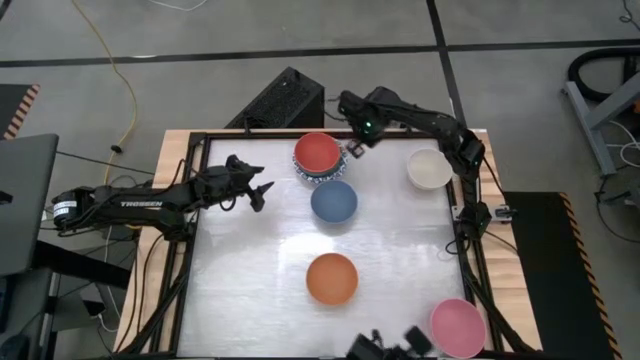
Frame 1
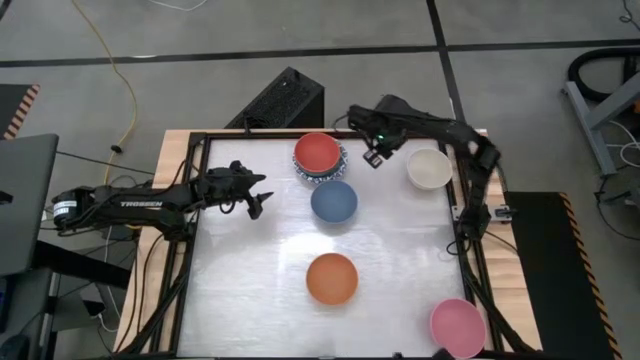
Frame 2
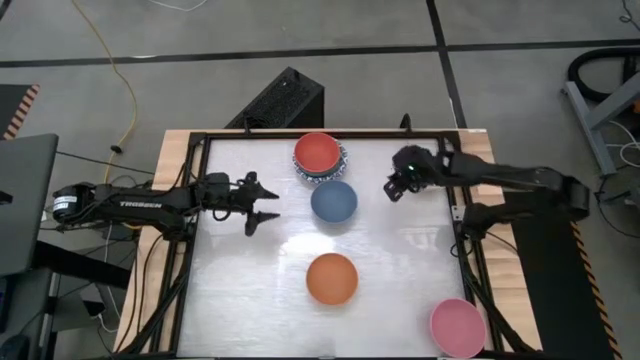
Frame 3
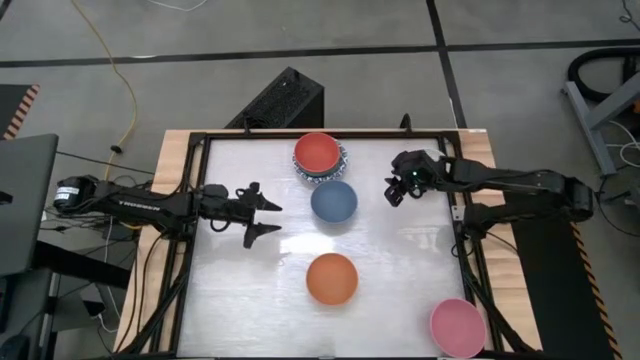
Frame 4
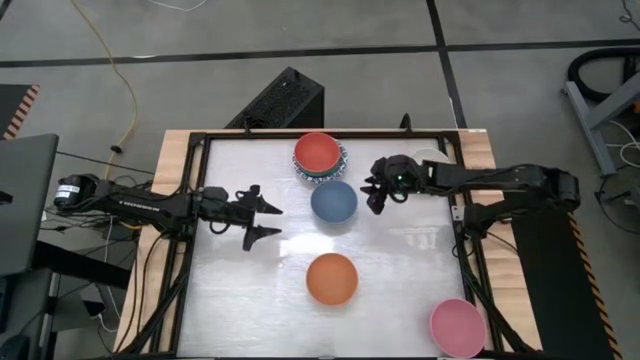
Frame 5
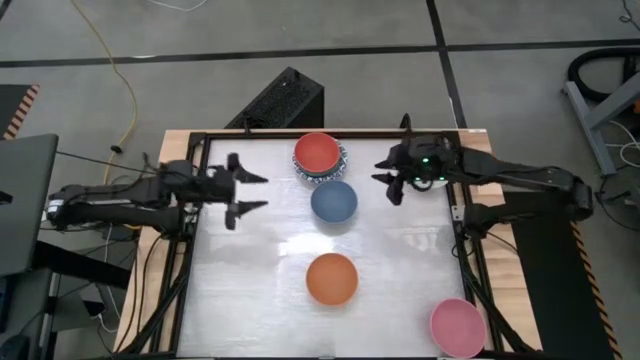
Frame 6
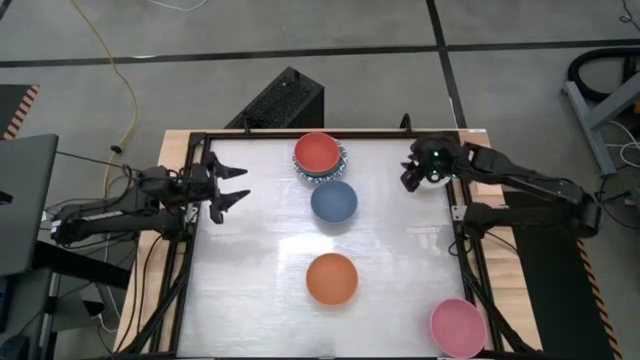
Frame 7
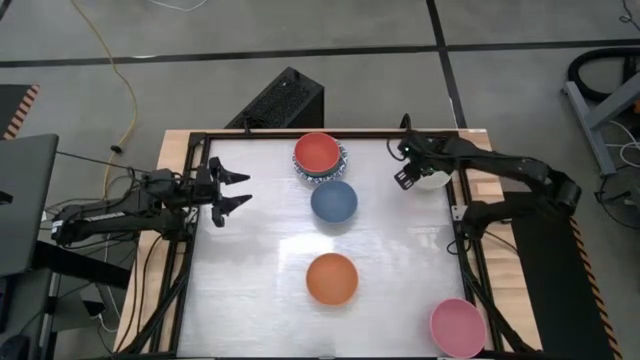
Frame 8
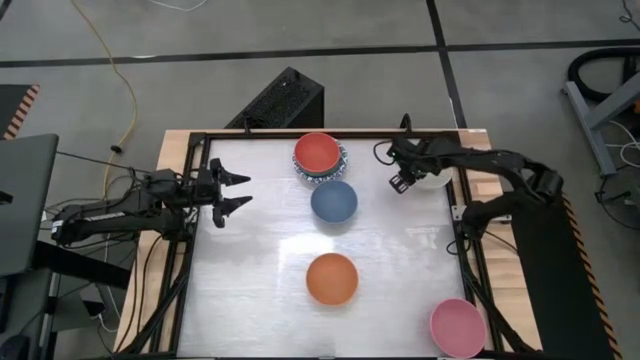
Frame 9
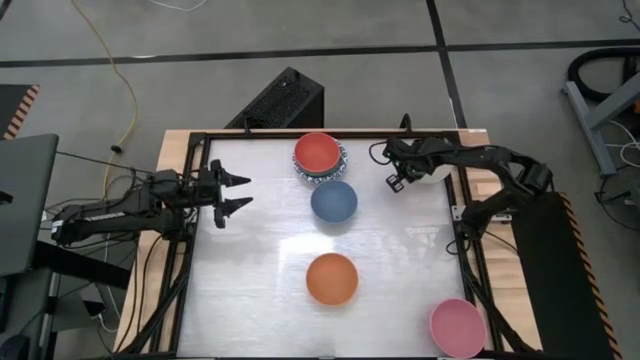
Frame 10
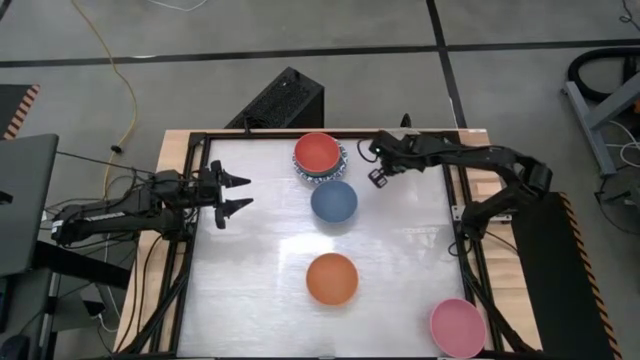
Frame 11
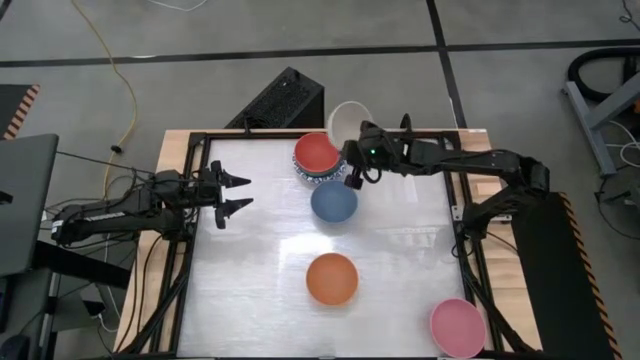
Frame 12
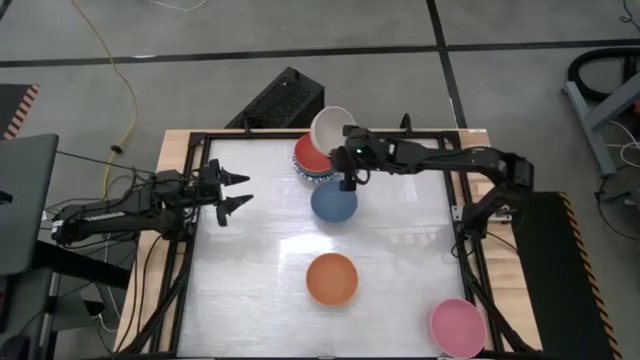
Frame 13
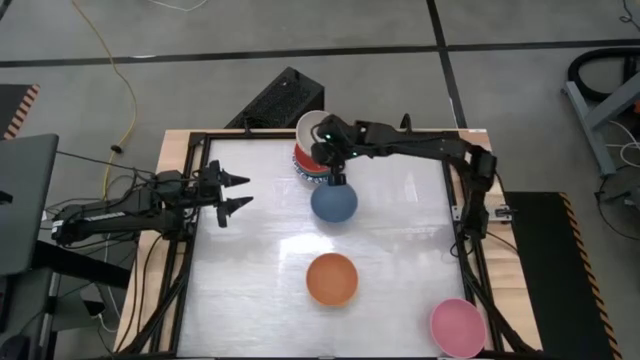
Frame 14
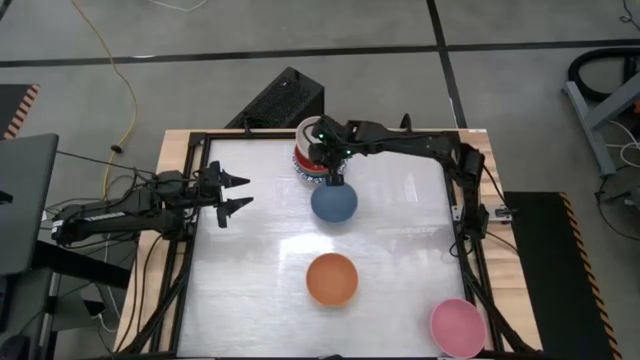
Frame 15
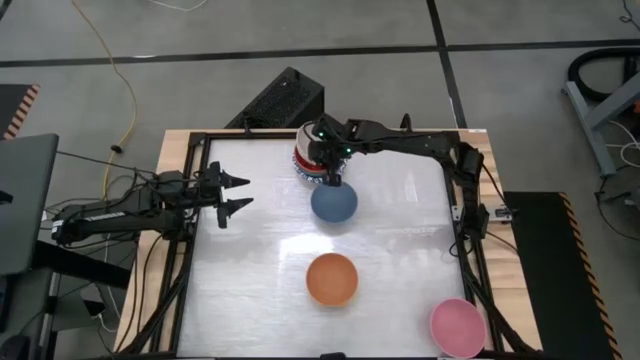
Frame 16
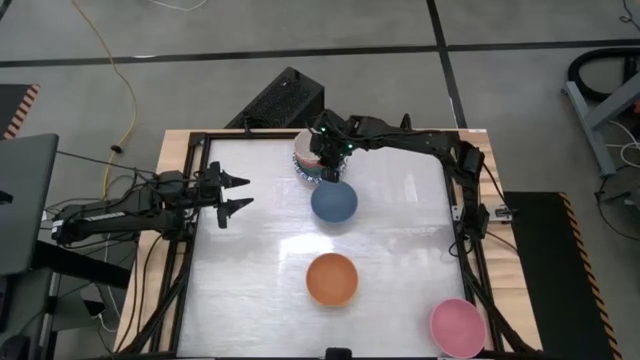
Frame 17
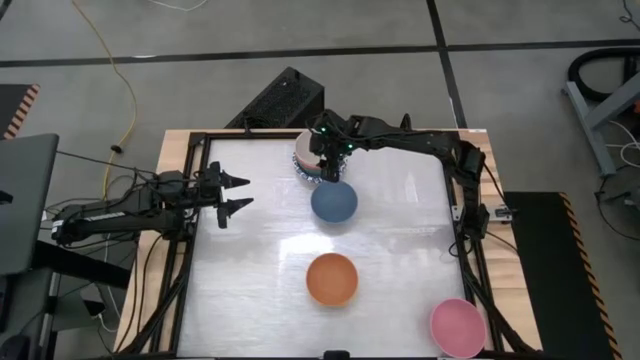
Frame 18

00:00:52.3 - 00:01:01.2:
Stack the white bowl on top of the orange bowl

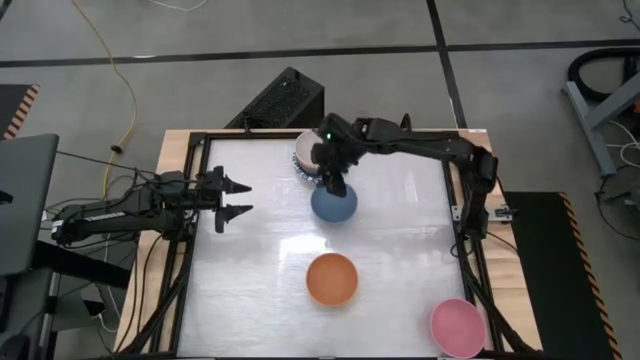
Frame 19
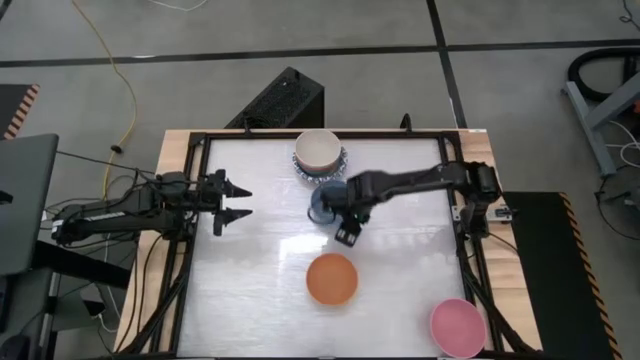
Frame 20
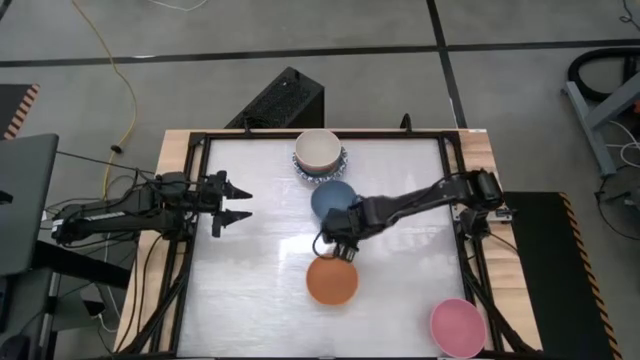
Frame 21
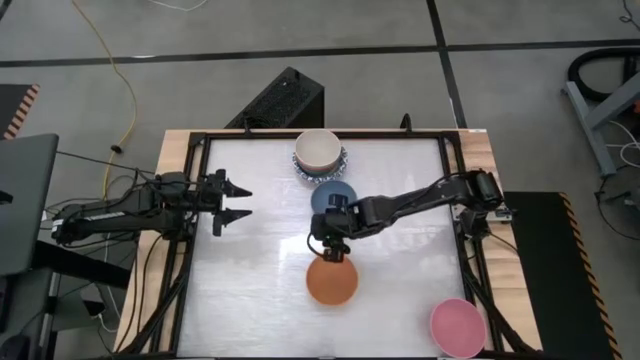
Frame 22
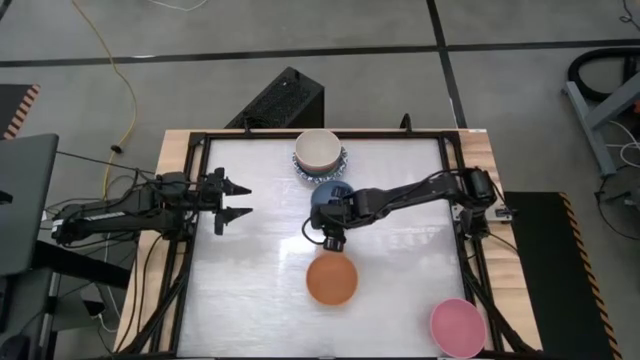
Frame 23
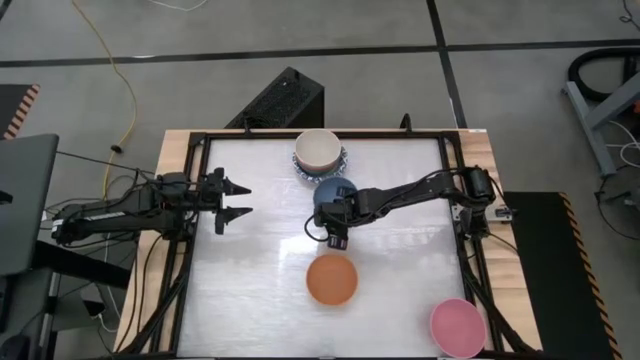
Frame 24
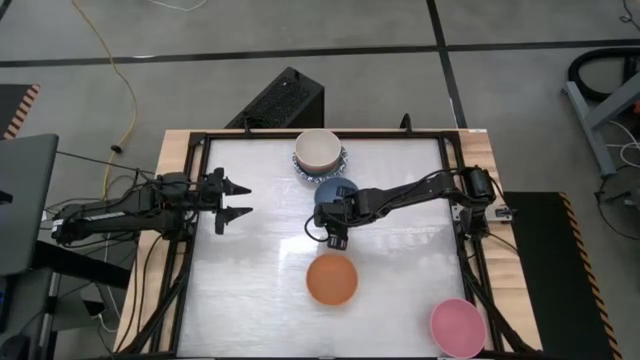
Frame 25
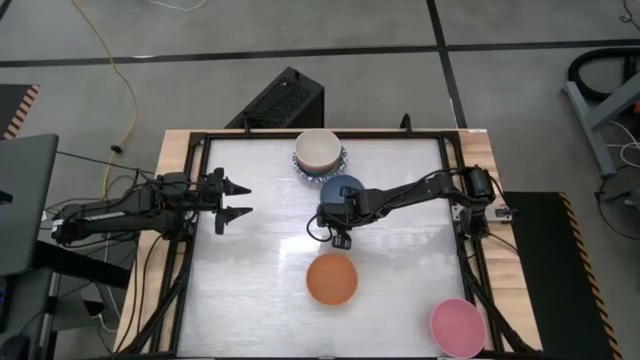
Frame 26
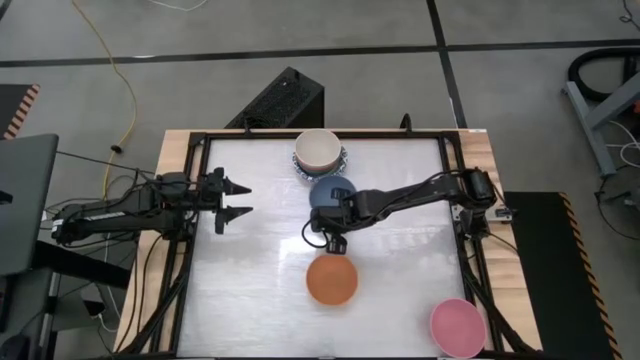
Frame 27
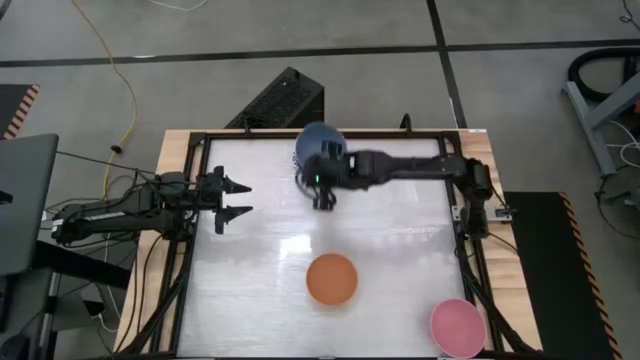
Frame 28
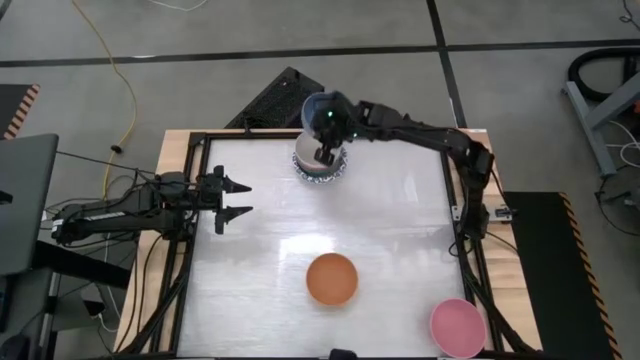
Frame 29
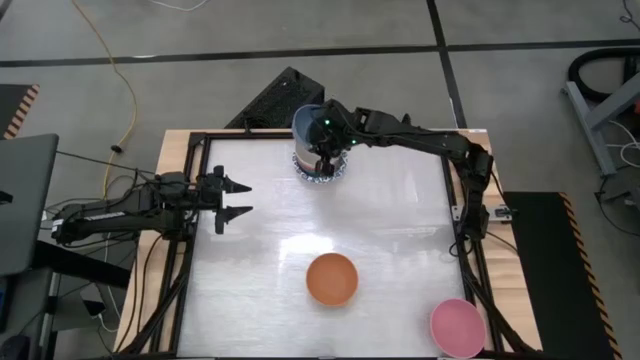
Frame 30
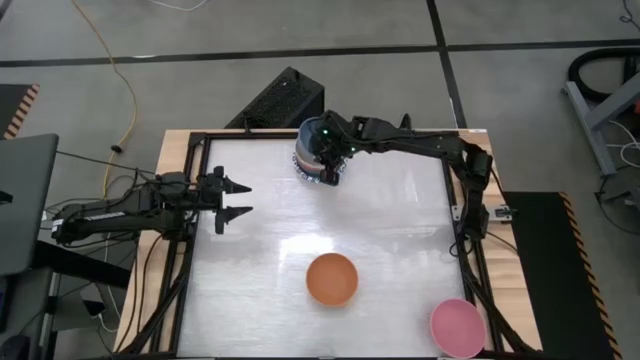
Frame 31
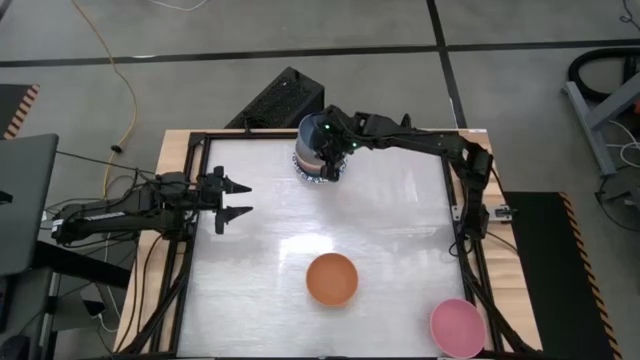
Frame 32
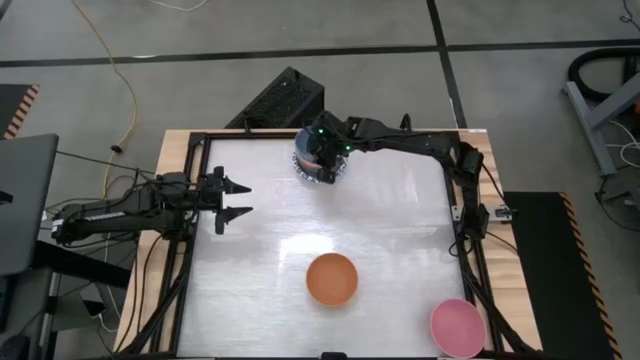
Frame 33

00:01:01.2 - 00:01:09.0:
Stack the blue bowl on top of the white bowl

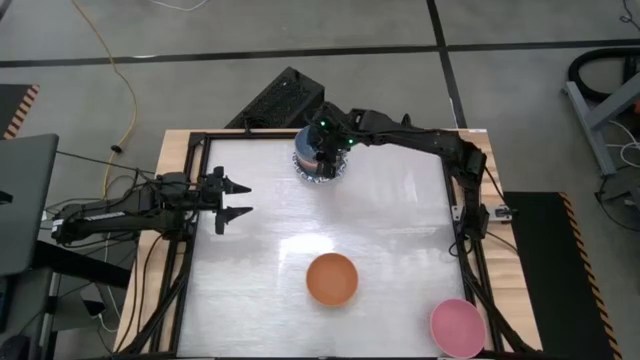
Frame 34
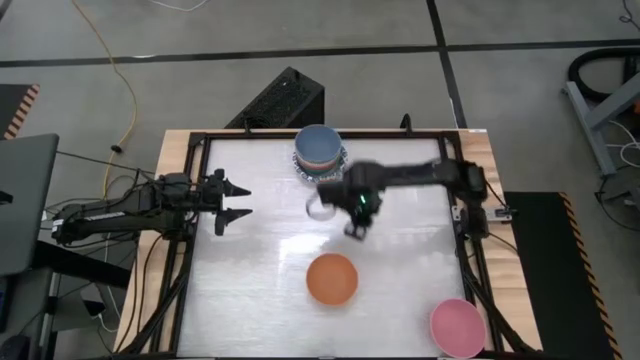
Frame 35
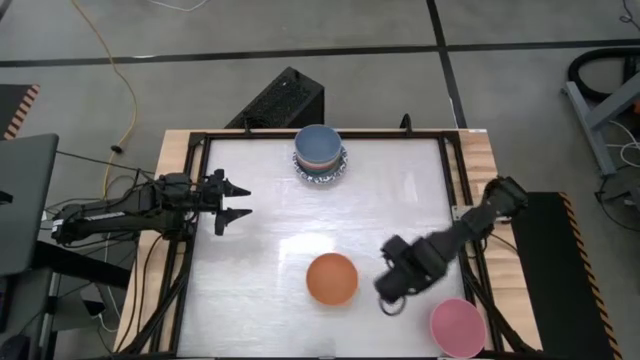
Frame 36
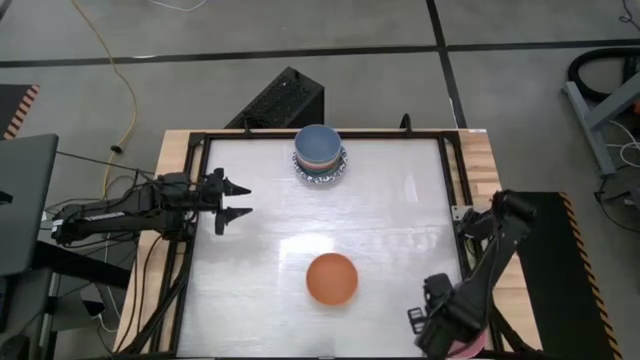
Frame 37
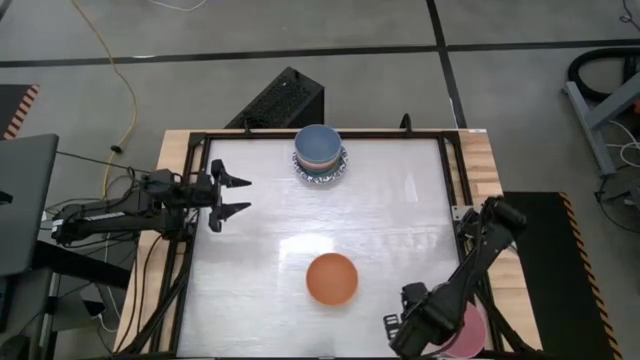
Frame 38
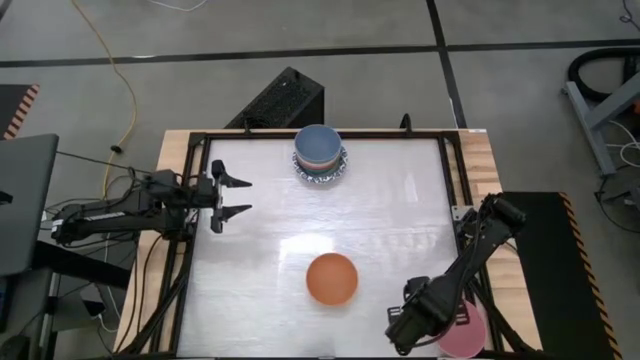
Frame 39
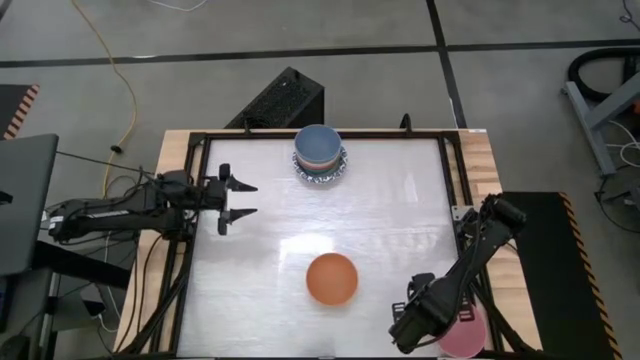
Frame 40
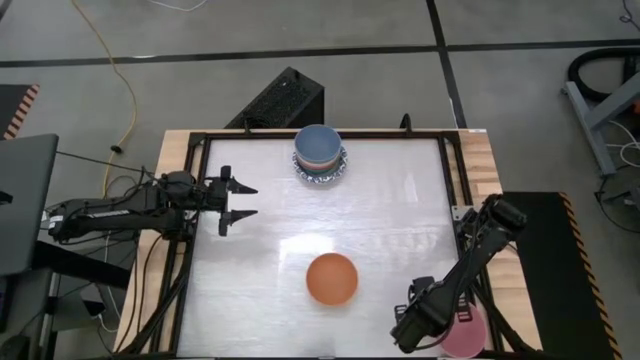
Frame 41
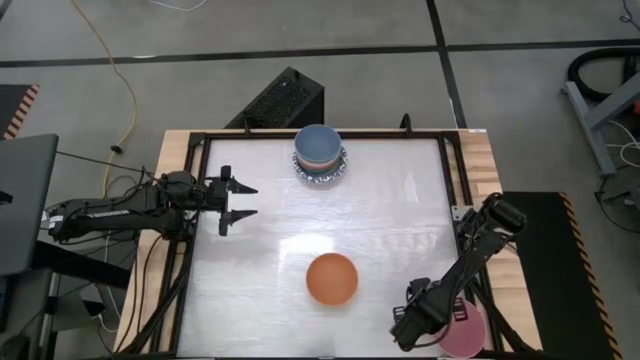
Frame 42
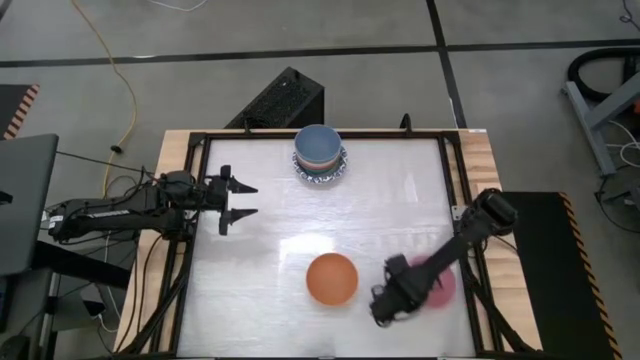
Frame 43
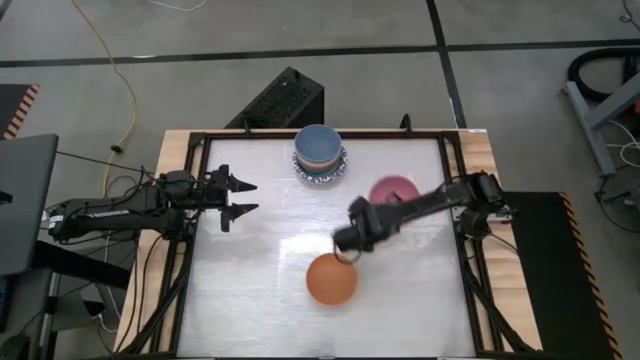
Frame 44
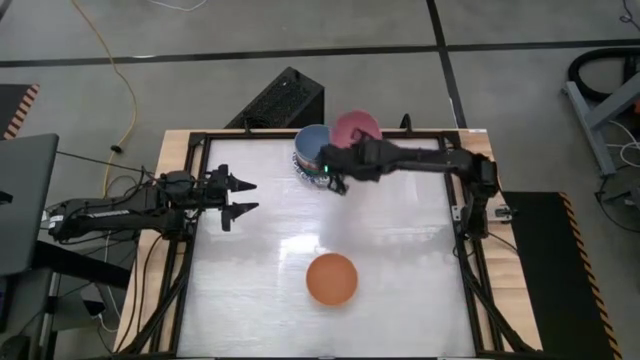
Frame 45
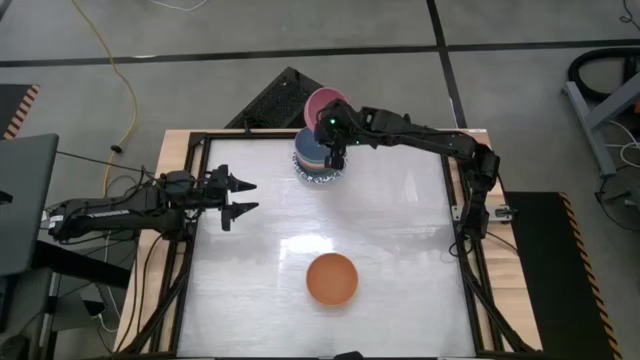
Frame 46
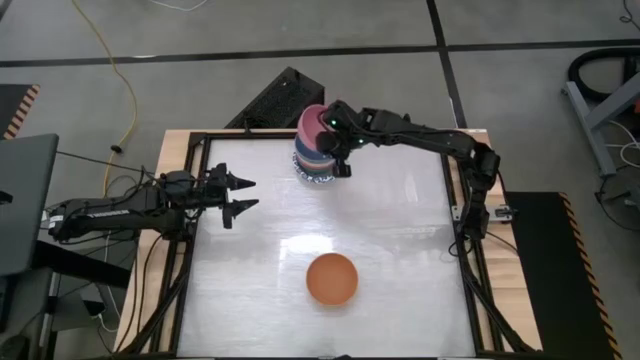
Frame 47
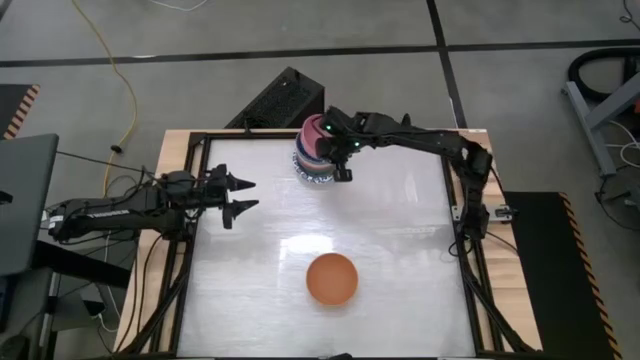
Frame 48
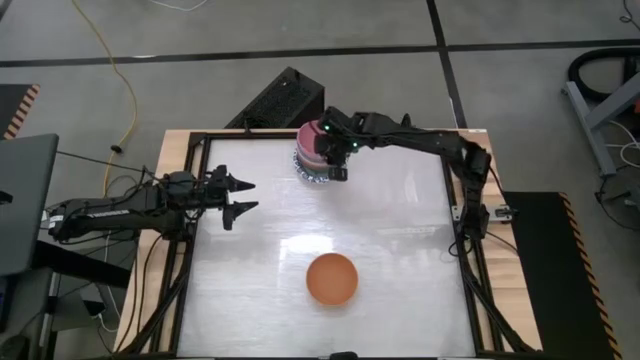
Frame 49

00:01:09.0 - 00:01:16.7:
Stack the pink bowl on top of the blue bowl
